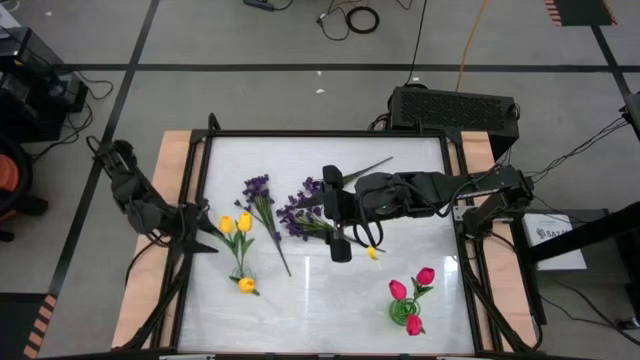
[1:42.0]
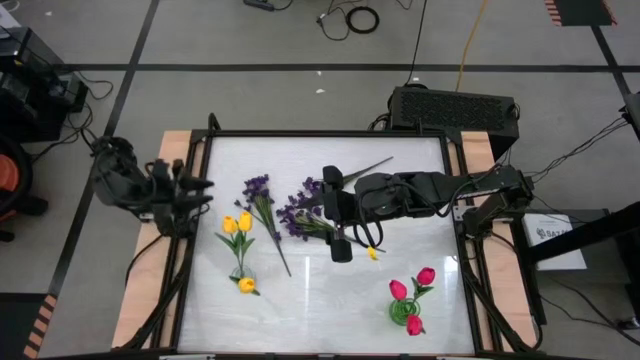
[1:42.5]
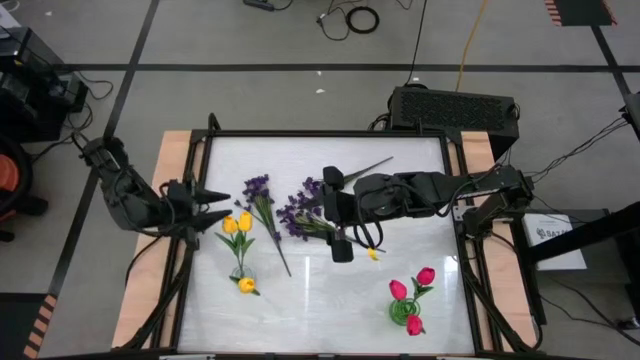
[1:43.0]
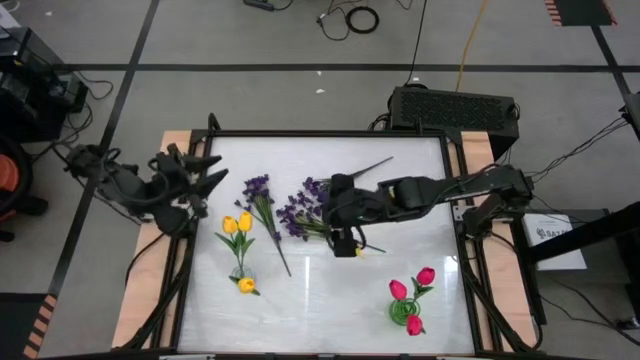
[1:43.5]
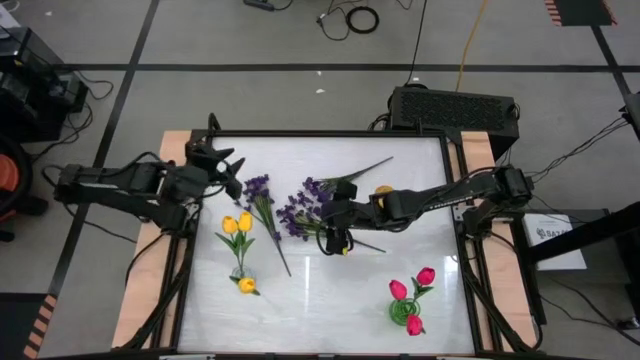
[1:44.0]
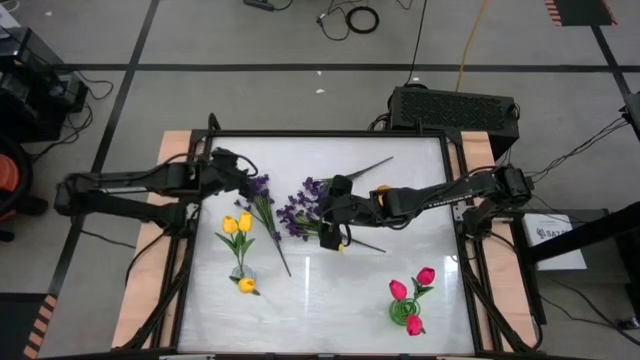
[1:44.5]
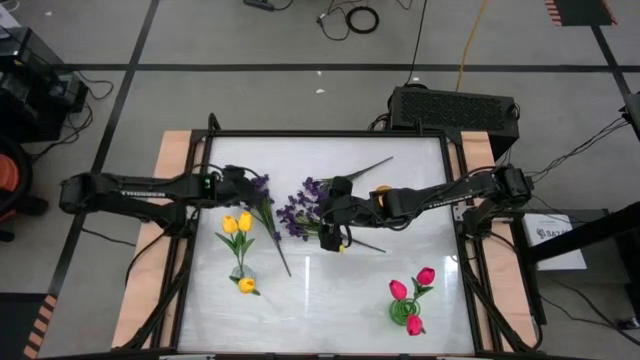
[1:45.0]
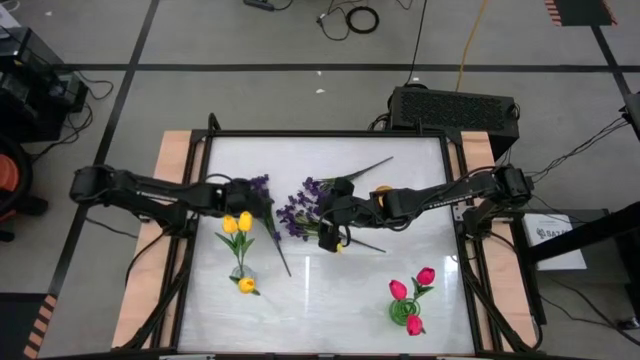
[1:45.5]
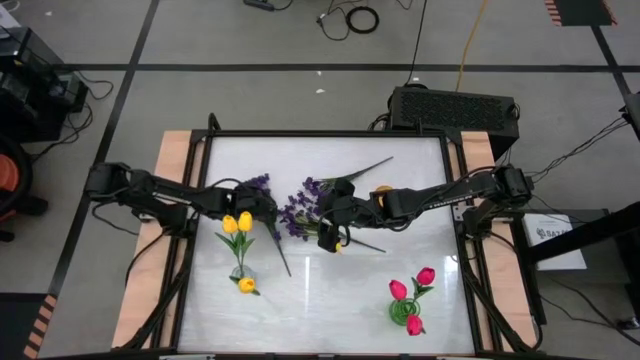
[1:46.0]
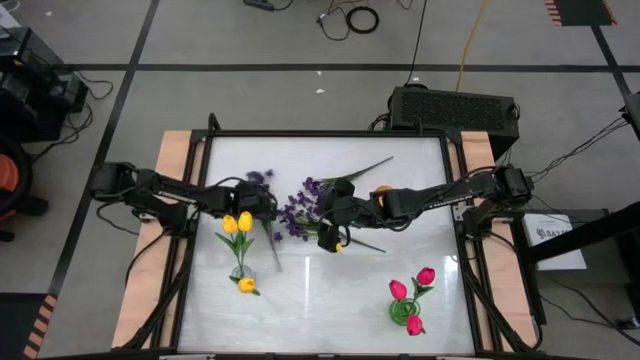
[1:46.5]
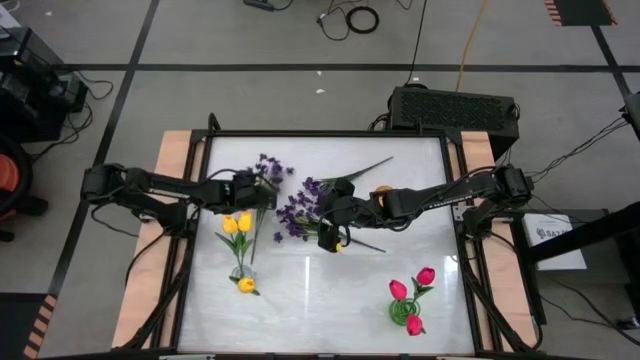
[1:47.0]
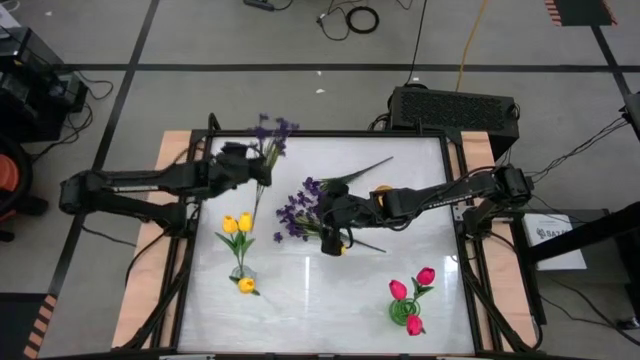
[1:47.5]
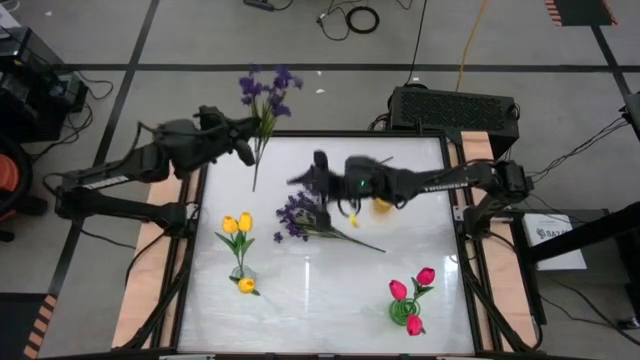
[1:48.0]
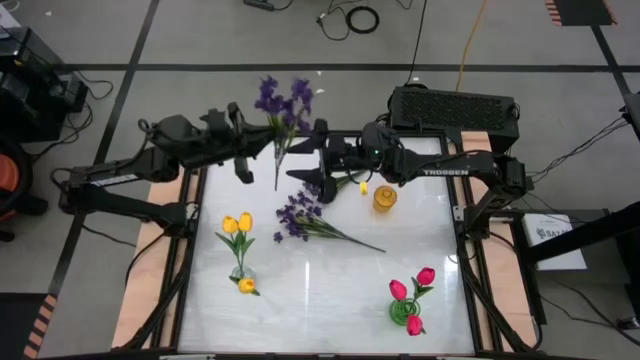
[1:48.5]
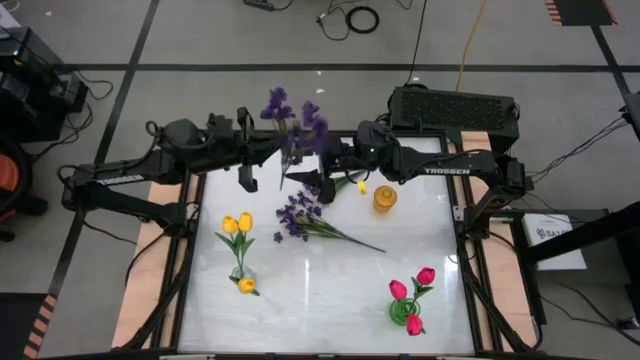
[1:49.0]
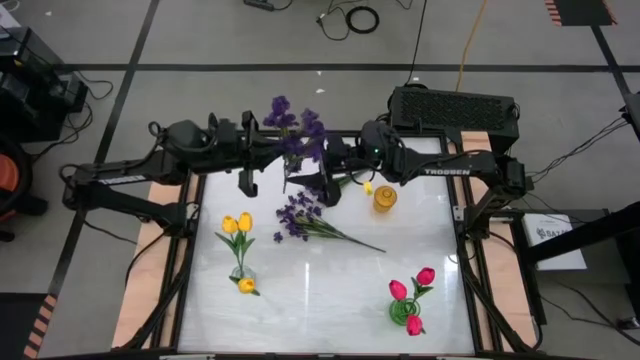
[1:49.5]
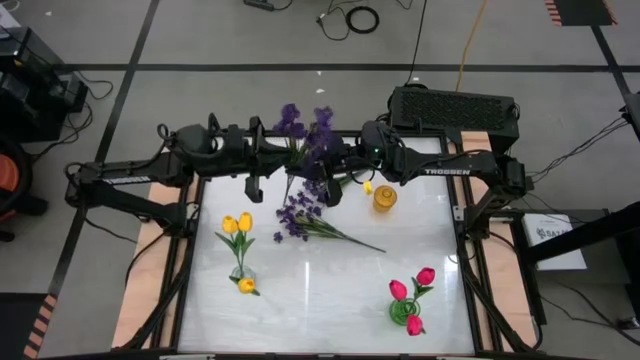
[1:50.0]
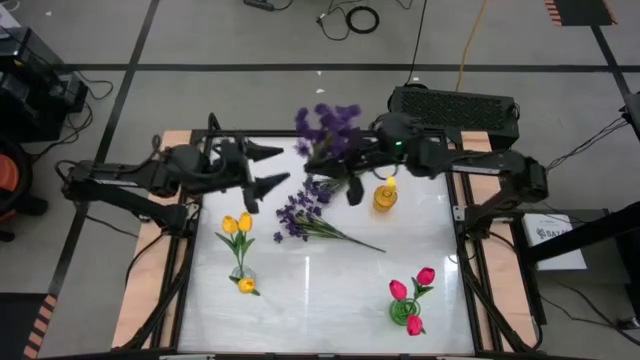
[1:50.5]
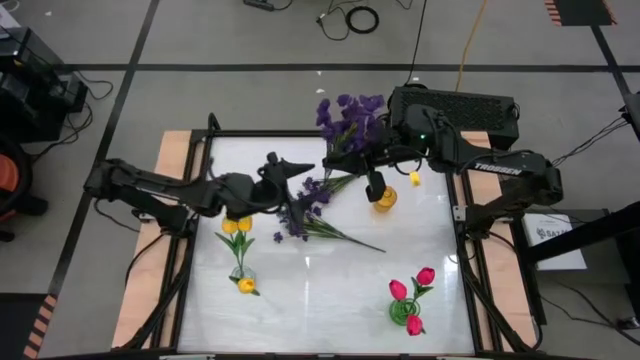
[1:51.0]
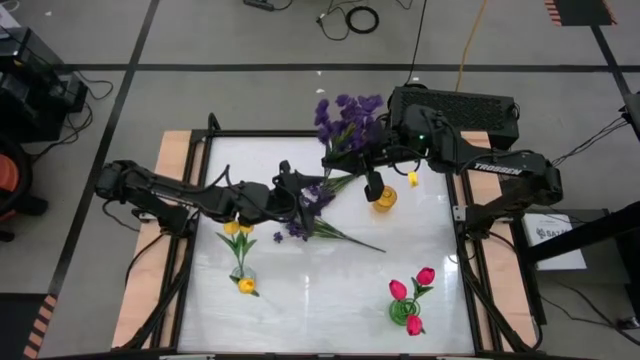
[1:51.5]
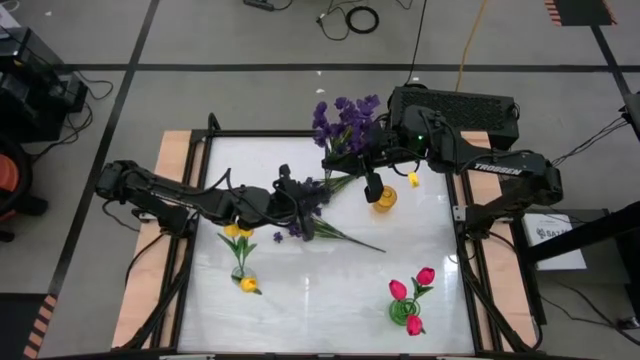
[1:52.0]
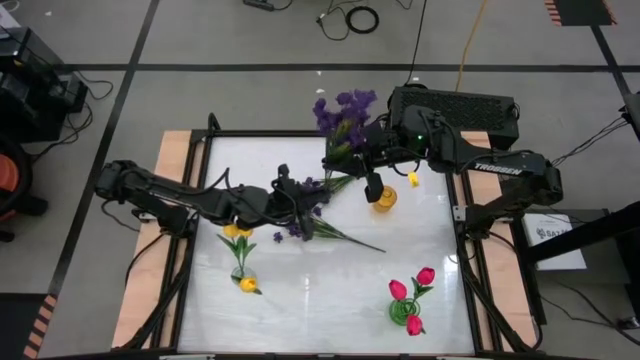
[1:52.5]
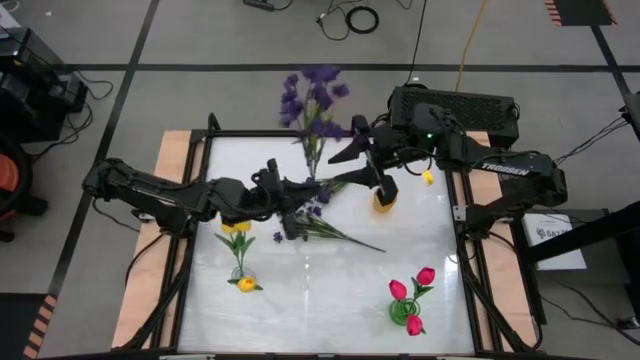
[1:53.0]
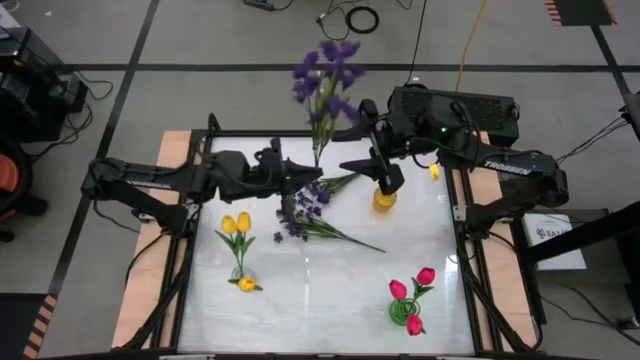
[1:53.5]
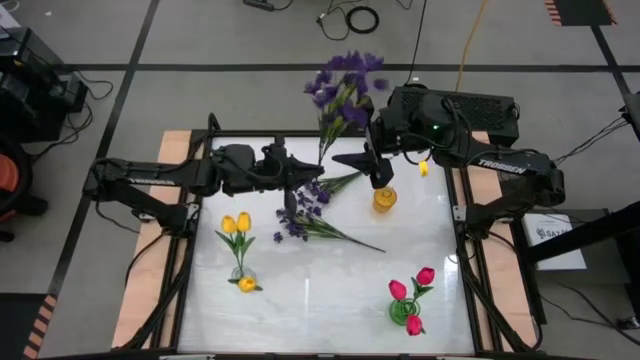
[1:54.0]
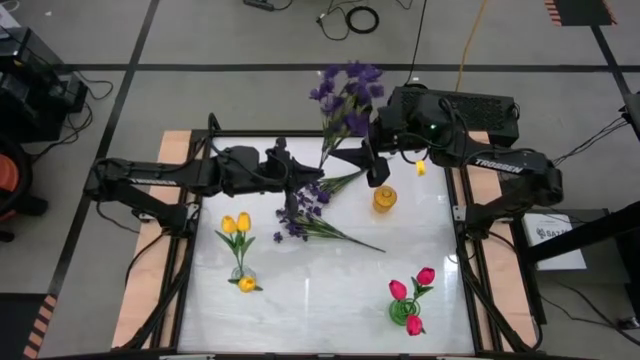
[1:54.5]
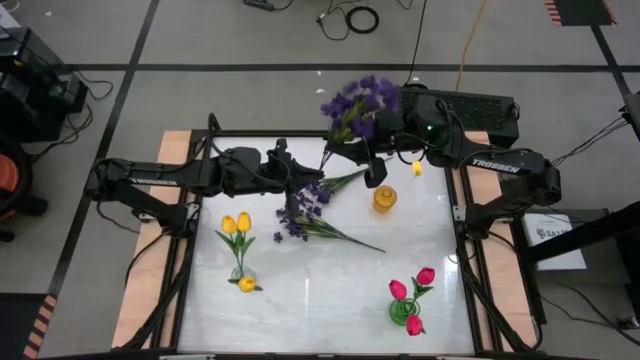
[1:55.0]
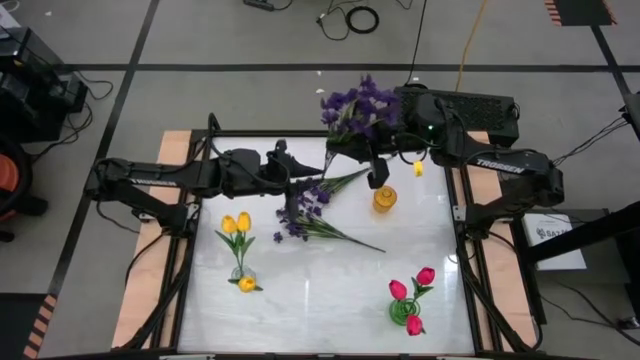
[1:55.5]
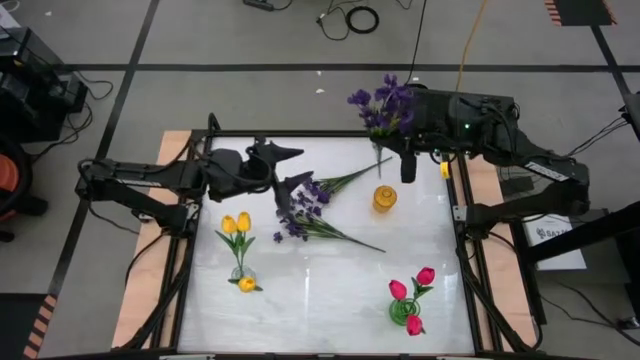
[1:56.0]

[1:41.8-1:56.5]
Task: Sort flowers into vase by color
Put the top left purple flowers into the yellow vase

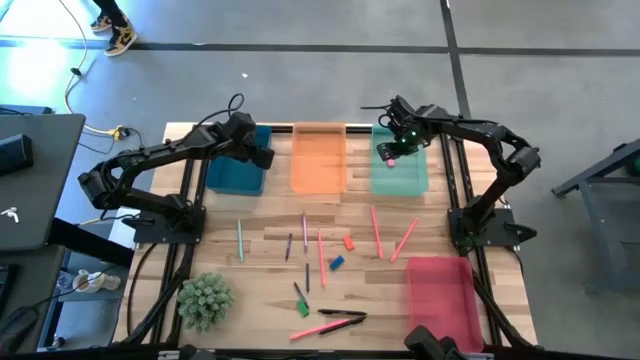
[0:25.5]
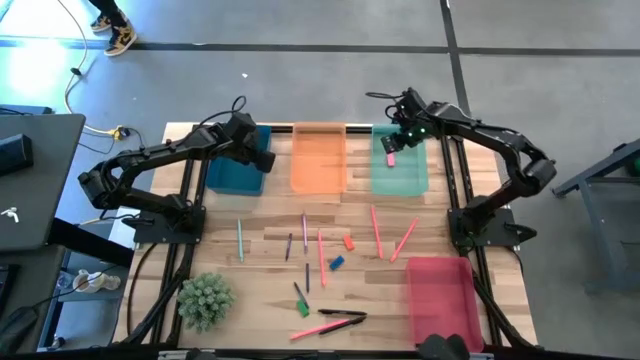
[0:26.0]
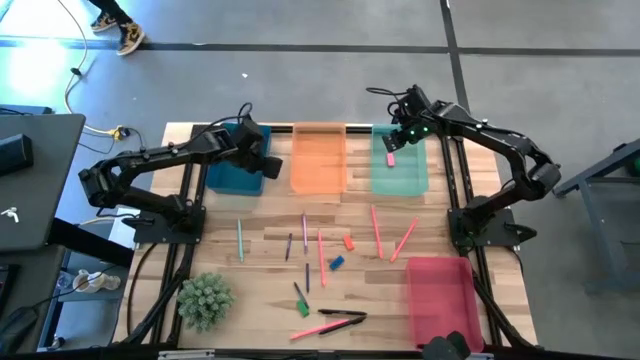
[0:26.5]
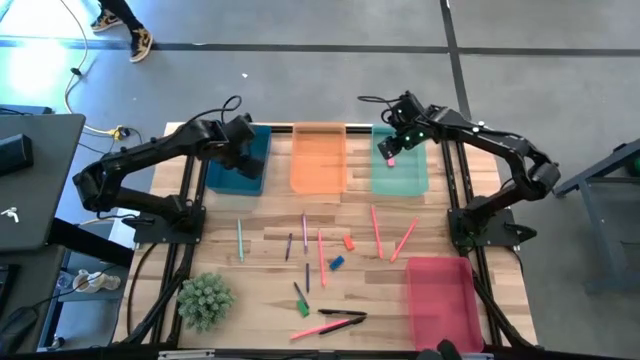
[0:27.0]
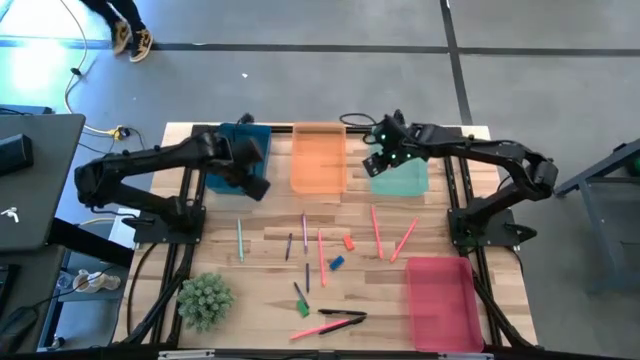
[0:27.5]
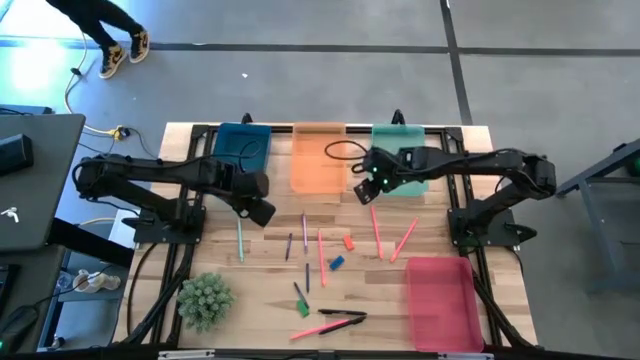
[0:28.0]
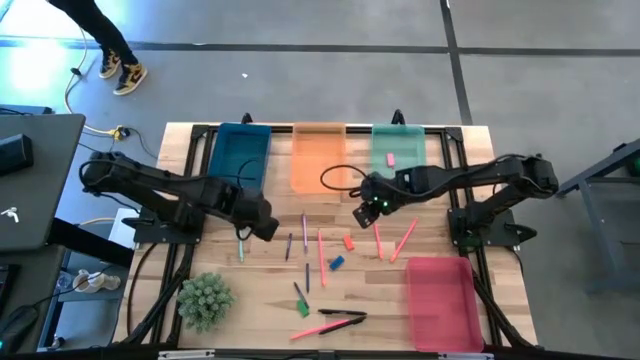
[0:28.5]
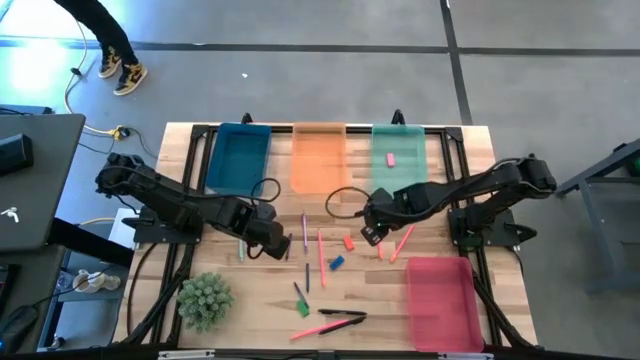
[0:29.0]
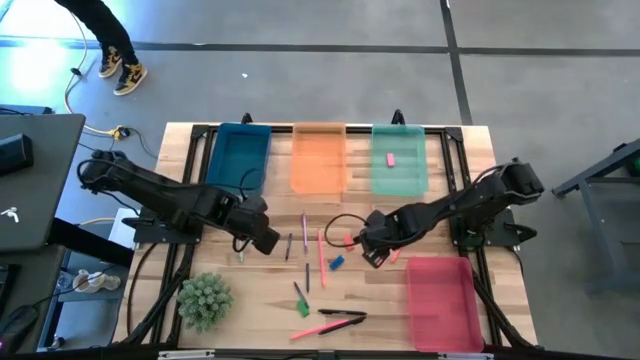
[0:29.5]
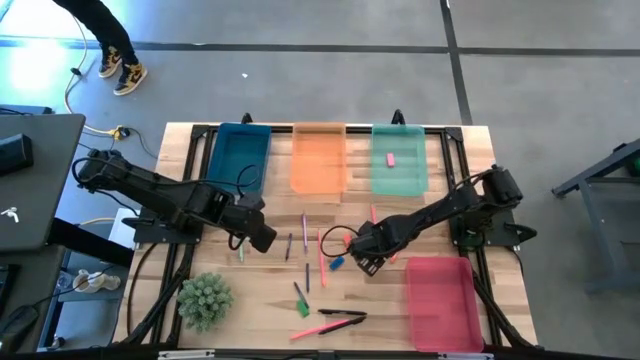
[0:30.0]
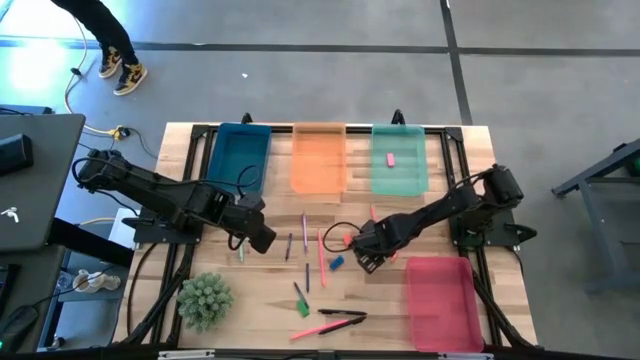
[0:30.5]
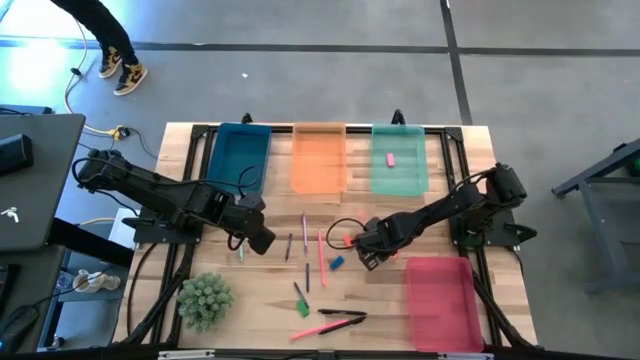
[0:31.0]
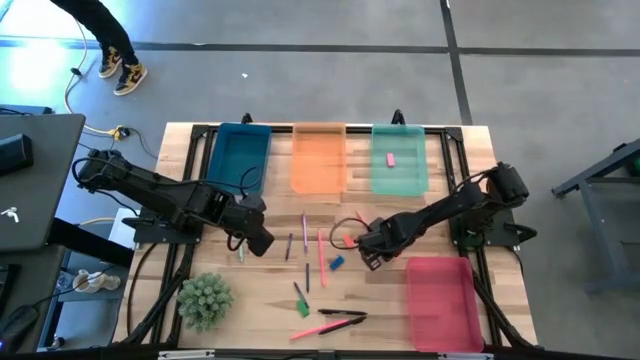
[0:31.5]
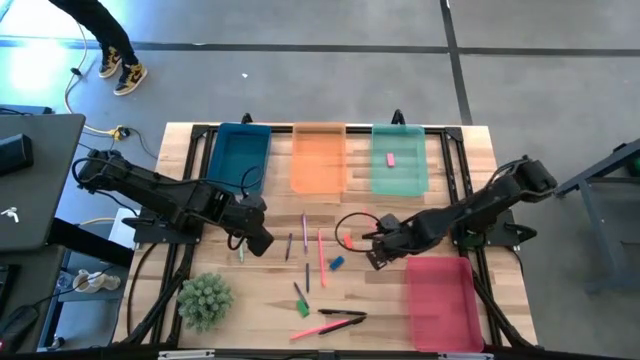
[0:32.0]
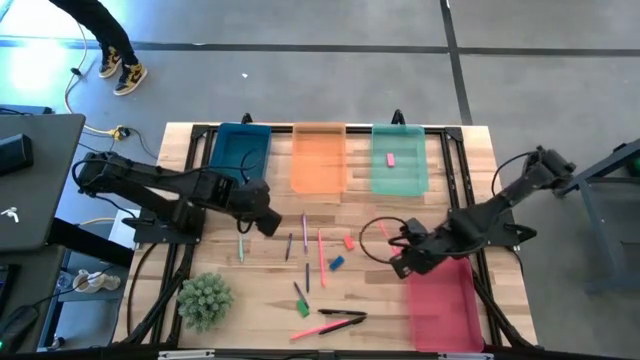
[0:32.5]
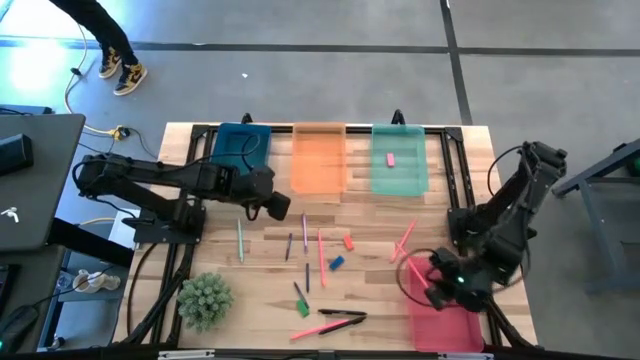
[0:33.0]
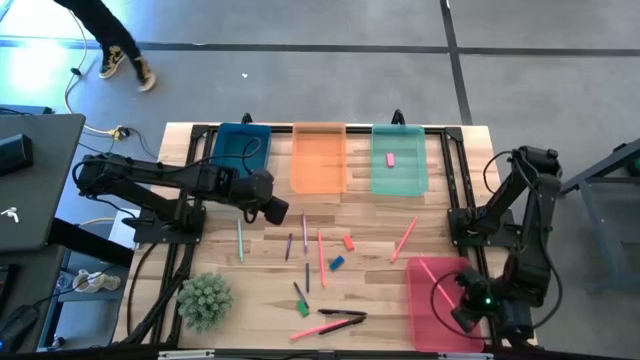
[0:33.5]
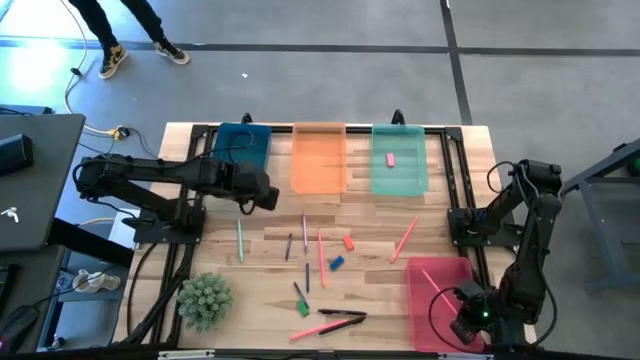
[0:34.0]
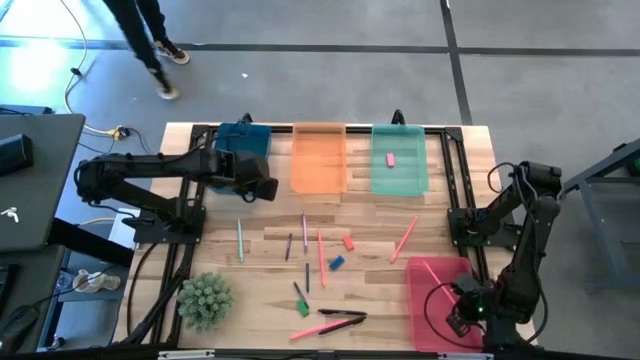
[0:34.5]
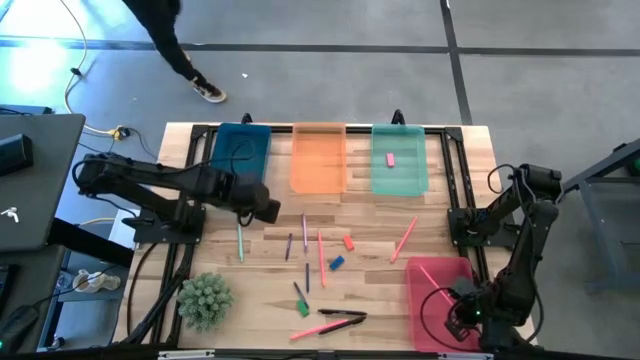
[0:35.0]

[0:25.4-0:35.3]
Task: Sort crayons/erasers/pens/pencils in bins
Put the top center pink pencil into the pink bin
